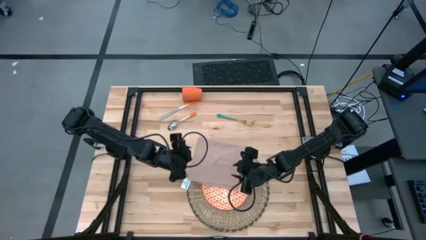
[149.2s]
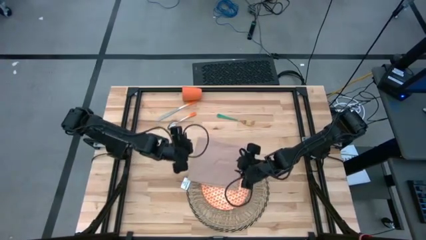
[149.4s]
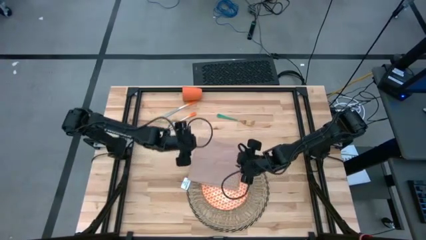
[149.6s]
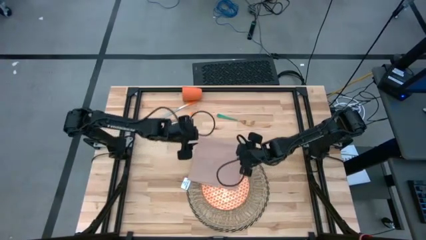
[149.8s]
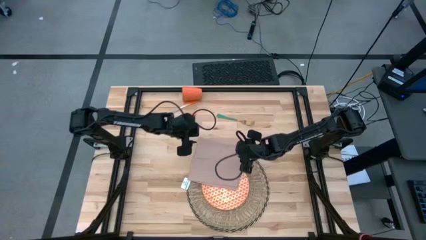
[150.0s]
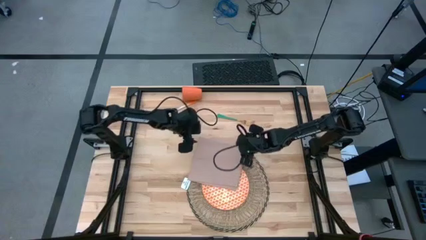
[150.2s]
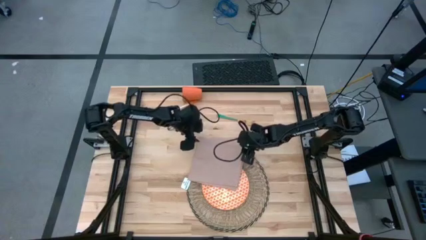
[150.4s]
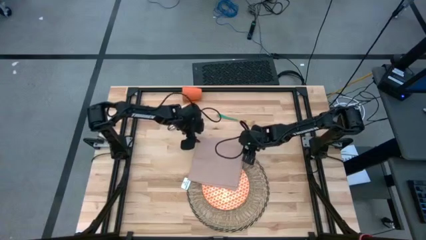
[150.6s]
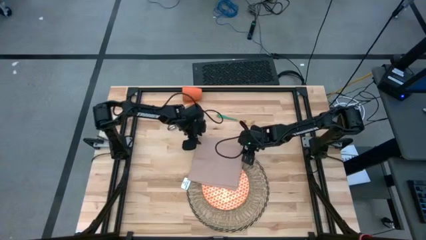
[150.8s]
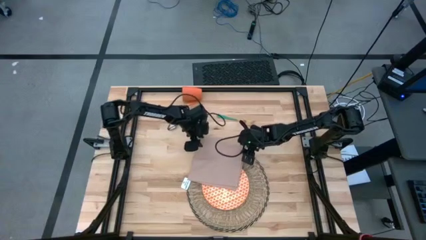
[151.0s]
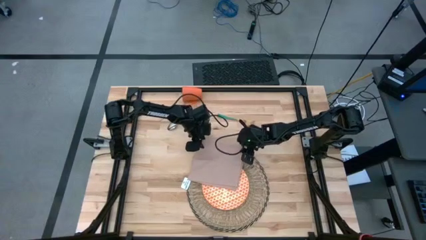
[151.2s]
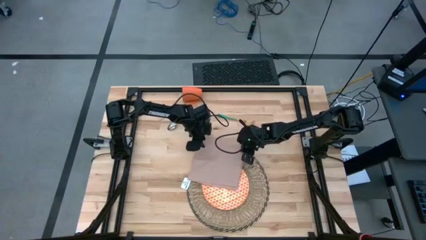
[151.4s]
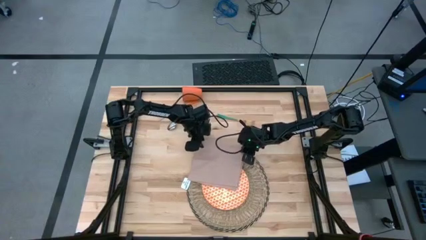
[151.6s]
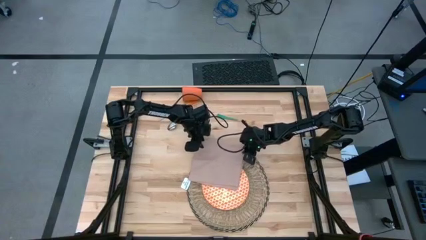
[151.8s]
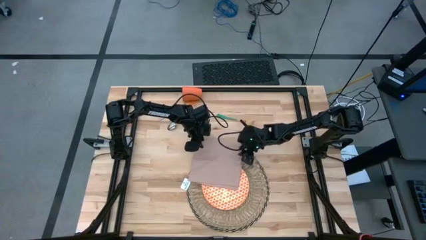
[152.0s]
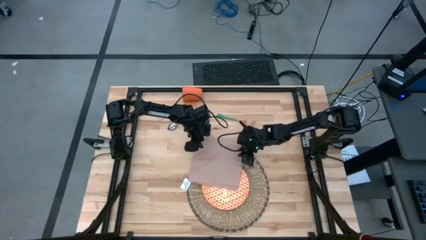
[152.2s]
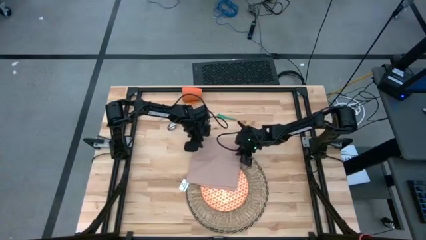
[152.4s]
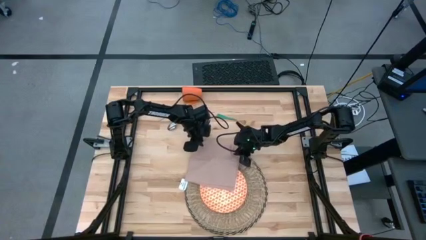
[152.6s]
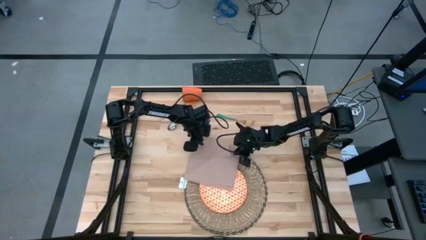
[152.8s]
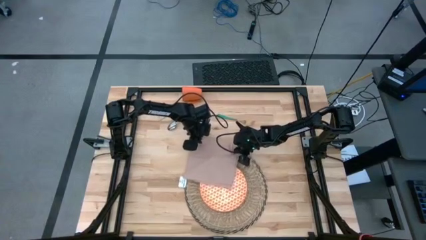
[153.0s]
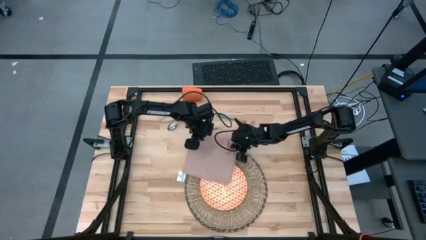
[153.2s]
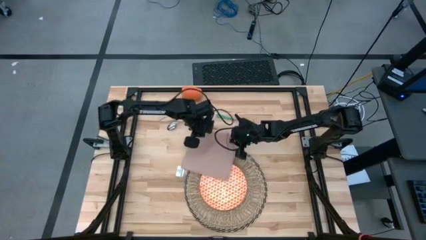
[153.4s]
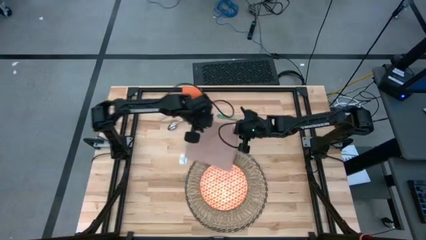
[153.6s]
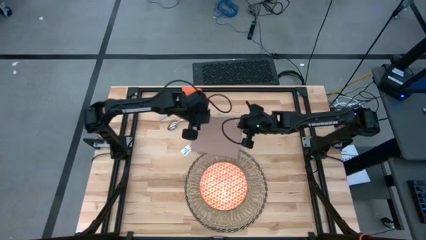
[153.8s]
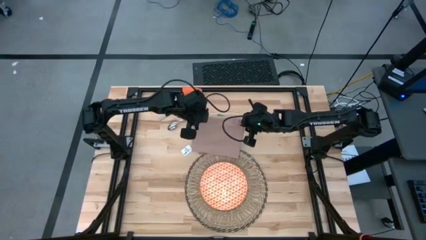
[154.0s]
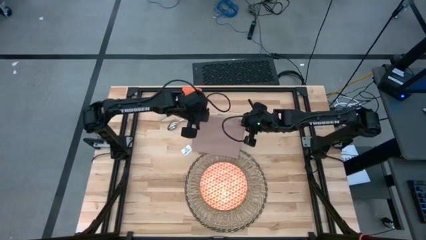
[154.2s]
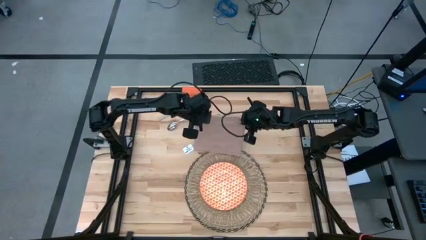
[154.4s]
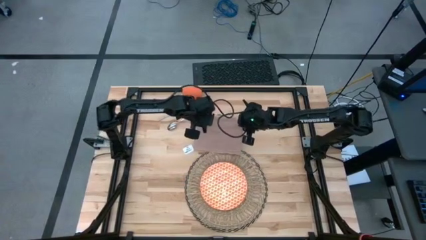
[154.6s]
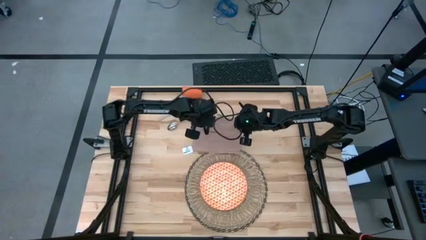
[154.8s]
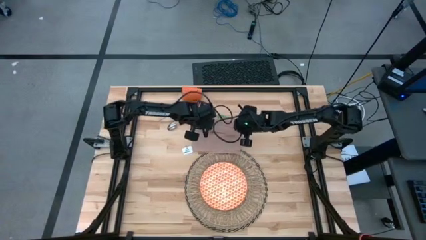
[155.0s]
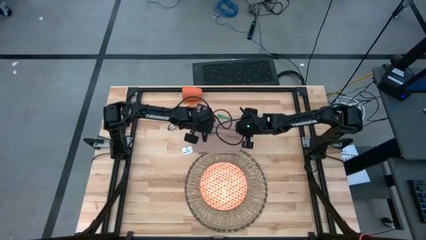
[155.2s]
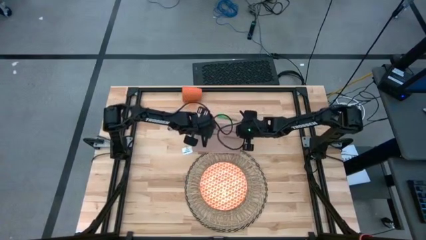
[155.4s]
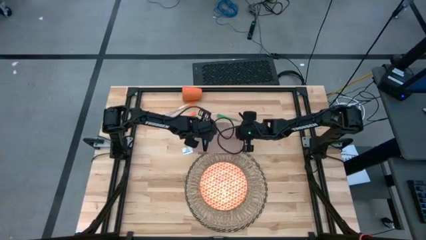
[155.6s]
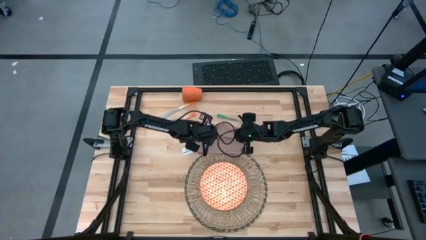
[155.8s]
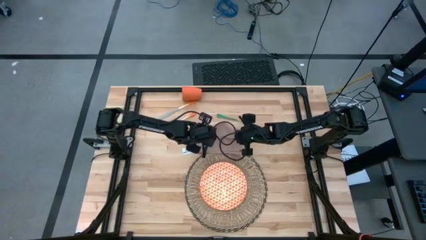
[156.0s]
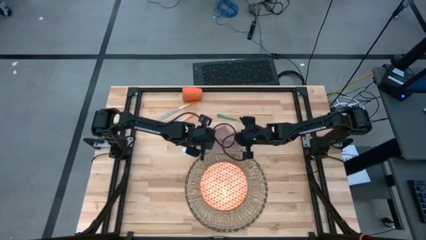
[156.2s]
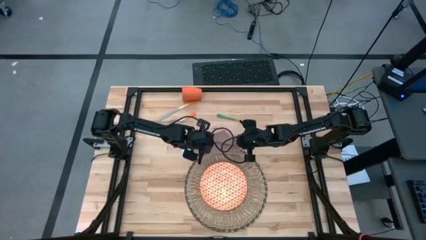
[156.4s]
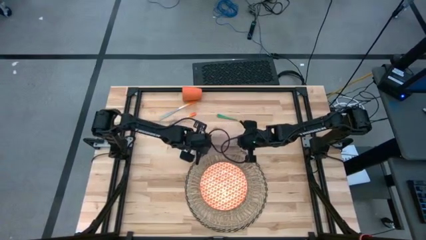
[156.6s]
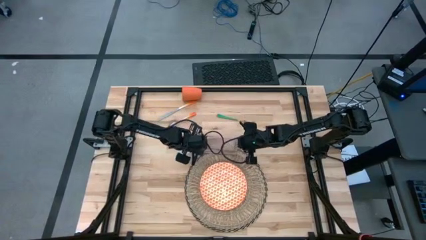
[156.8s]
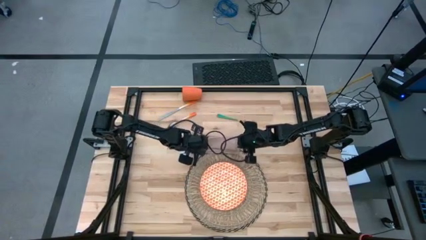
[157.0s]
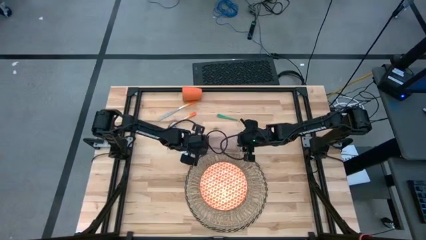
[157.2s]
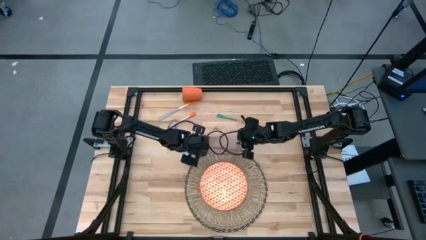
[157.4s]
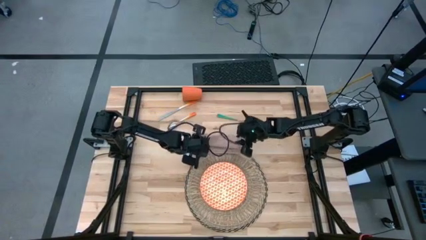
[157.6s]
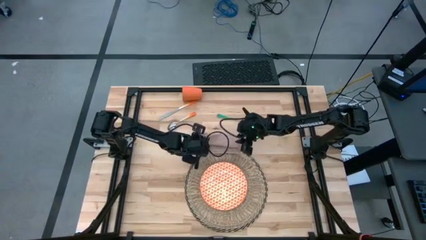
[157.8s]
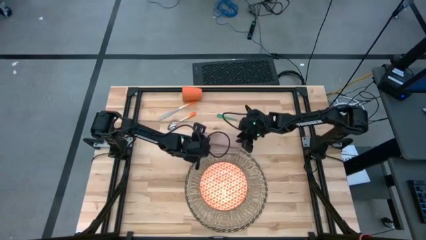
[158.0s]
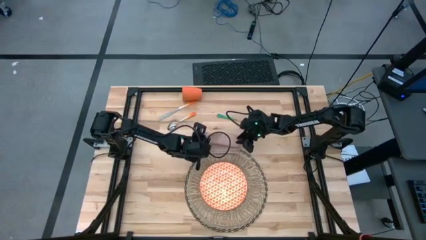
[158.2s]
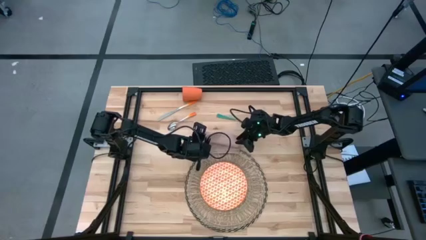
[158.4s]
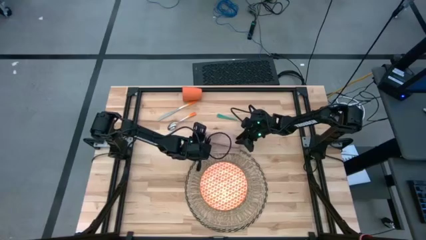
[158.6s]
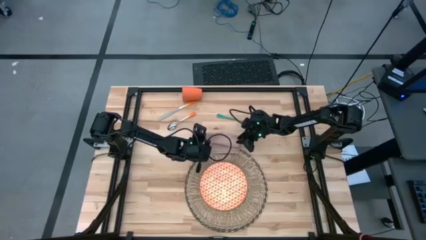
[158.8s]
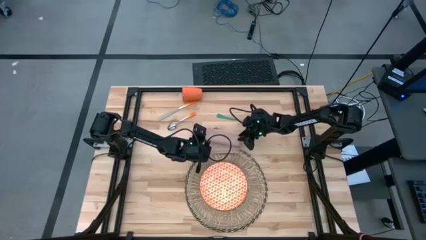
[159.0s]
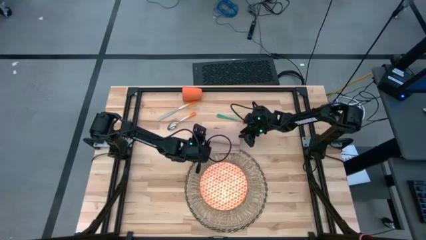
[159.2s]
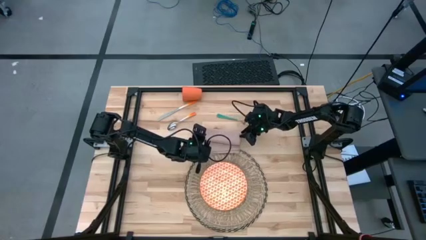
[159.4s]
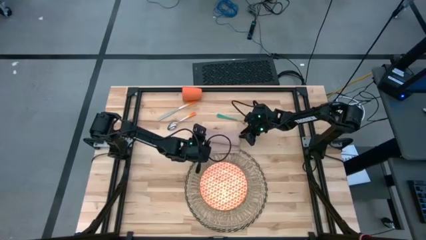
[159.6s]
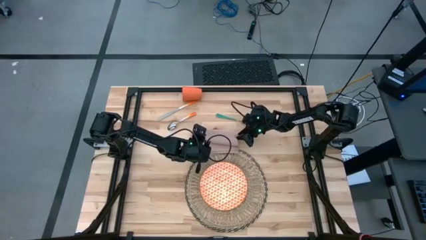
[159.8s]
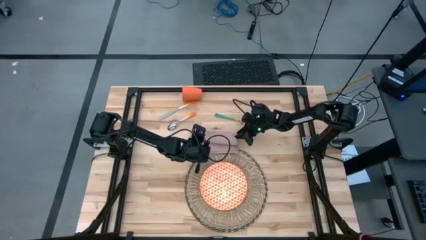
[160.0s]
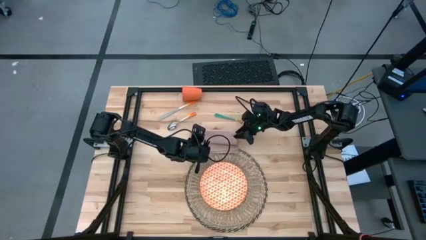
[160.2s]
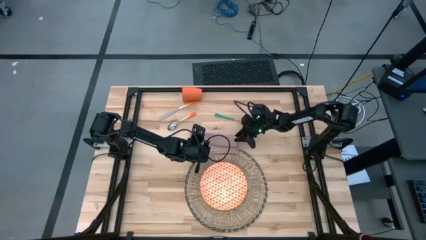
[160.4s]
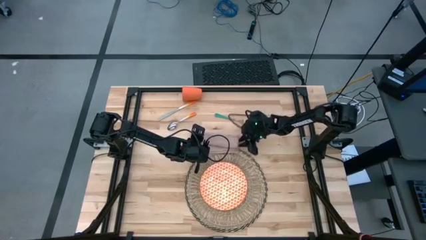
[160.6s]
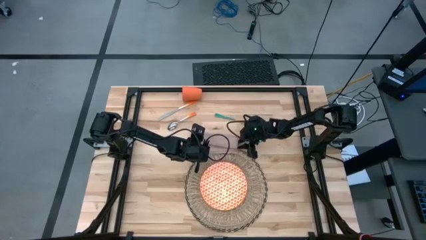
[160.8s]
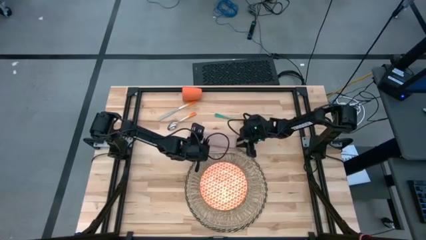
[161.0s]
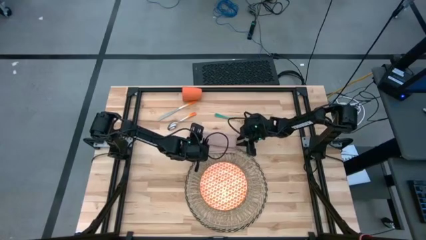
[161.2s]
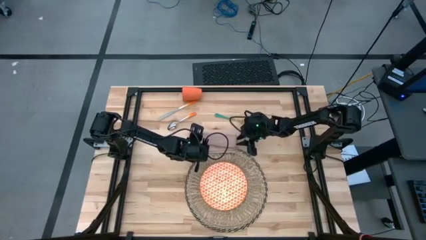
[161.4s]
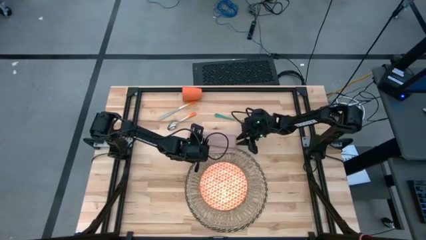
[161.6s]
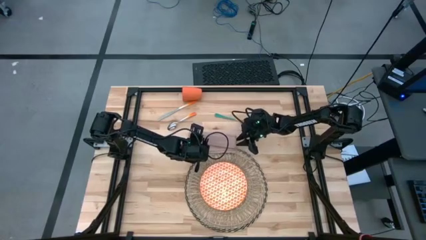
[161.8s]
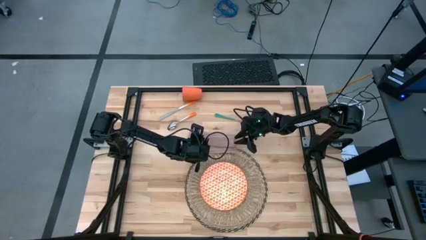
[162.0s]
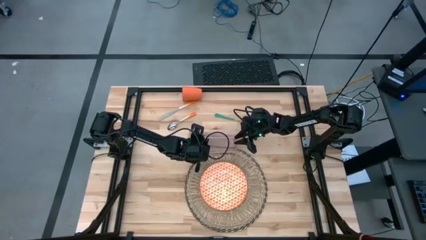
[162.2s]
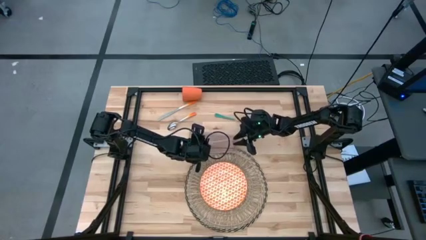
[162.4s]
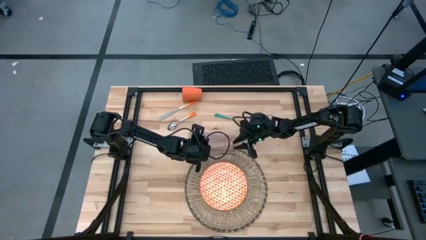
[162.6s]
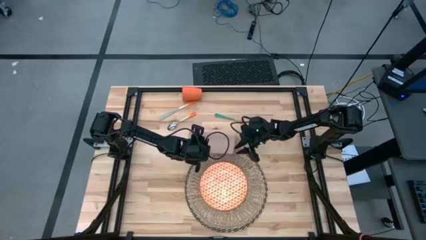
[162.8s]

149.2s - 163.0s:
Task: Set table place
Fold the napkin

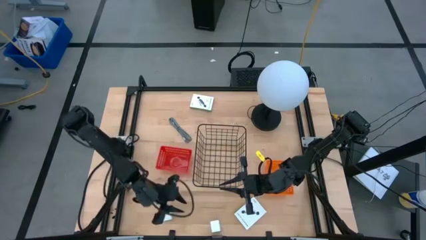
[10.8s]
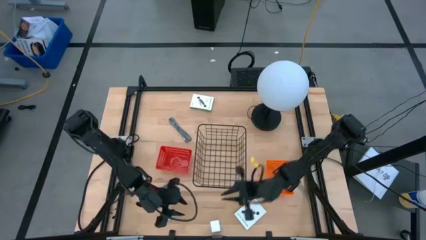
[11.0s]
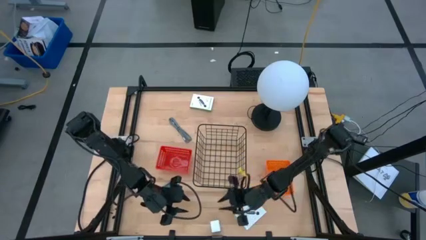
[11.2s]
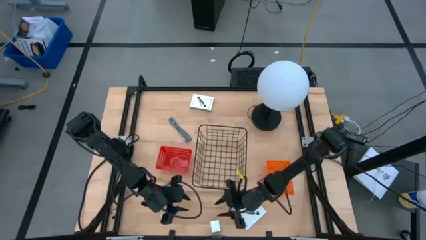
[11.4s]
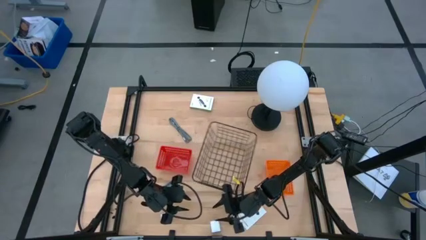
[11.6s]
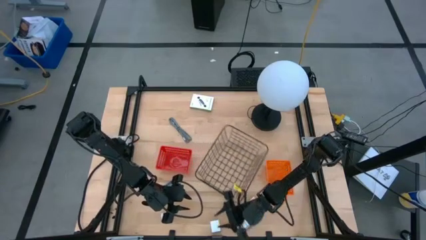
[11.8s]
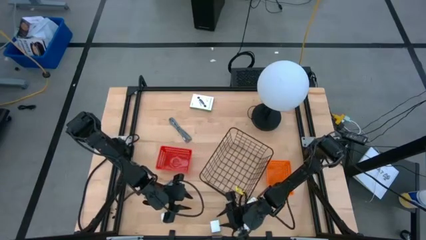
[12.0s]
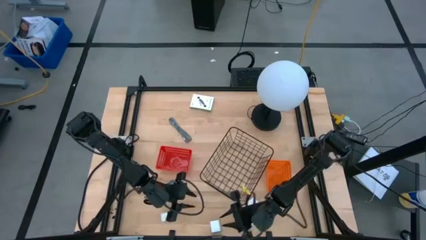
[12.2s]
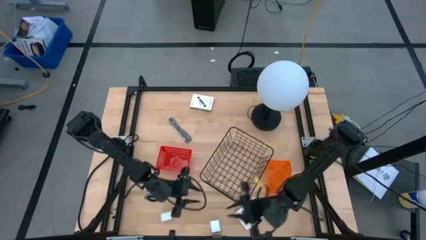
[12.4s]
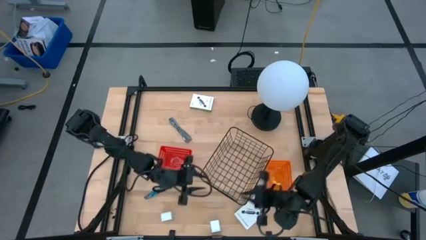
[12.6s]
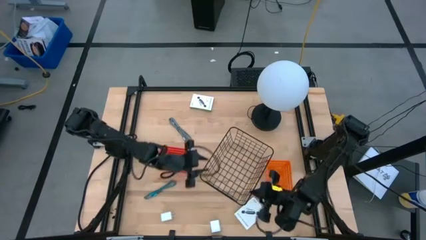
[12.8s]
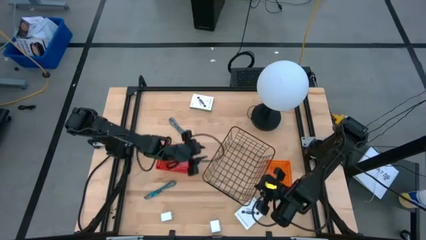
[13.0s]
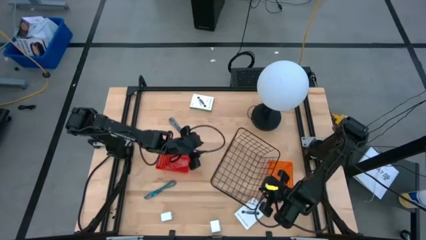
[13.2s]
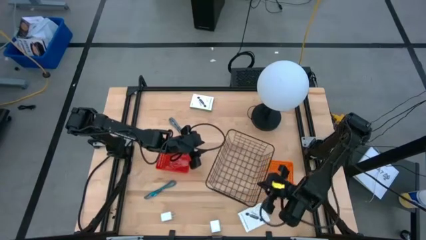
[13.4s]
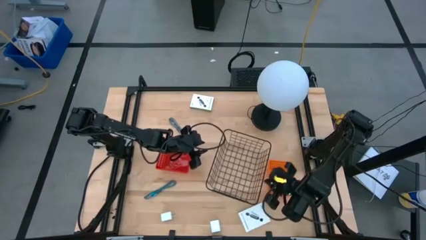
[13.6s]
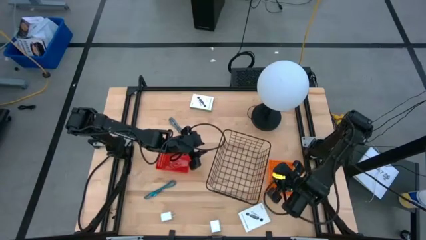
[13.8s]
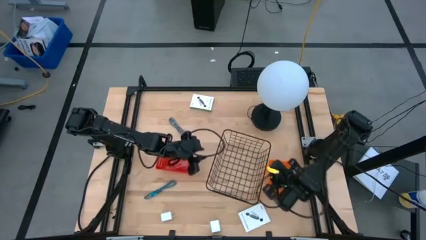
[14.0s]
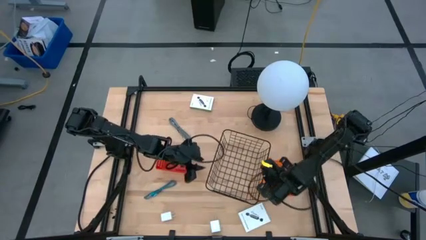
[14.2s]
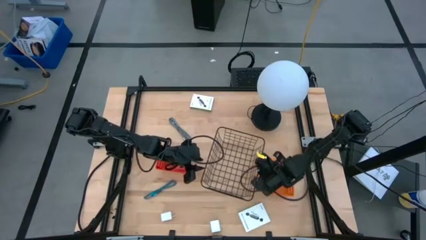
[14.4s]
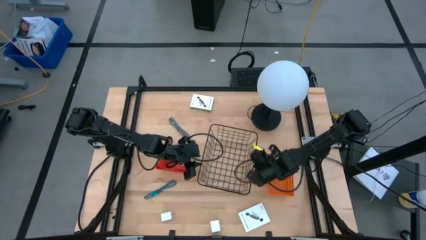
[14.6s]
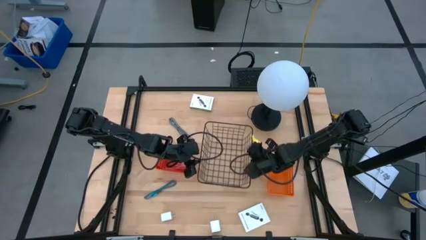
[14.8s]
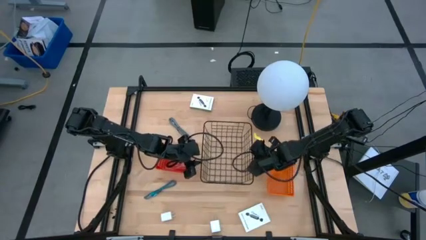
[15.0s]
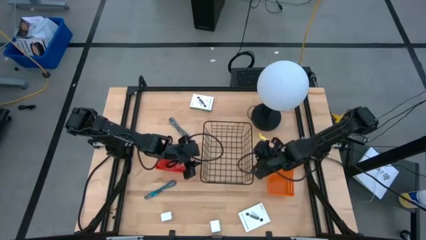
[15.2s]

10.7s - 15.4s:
Task: Pick and place items into bin
Adjust the black wire basket
